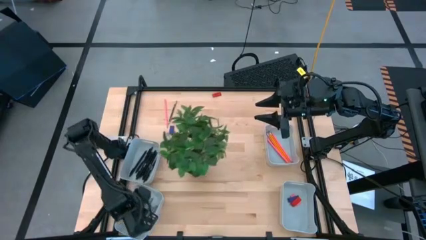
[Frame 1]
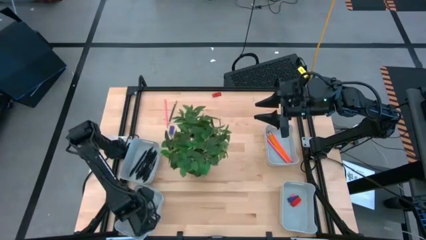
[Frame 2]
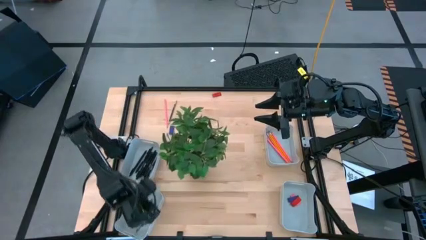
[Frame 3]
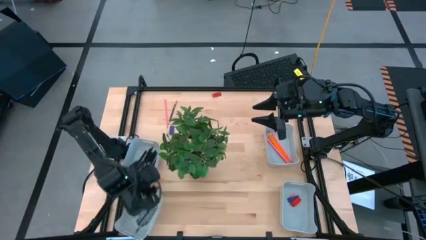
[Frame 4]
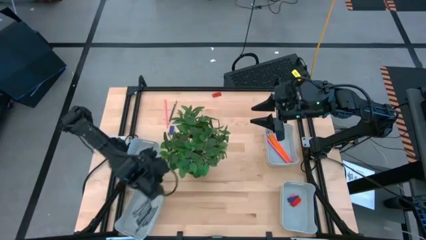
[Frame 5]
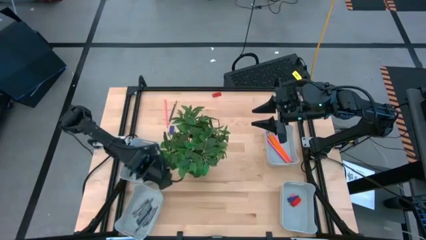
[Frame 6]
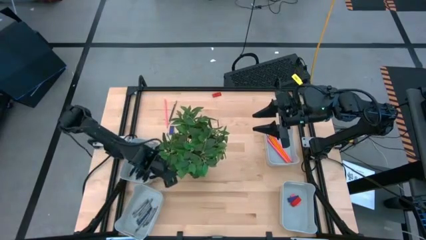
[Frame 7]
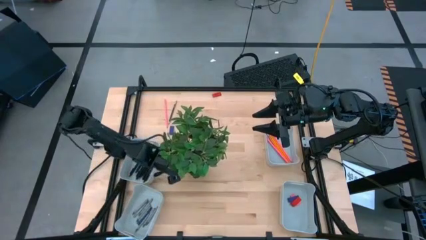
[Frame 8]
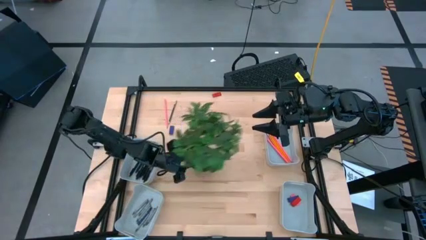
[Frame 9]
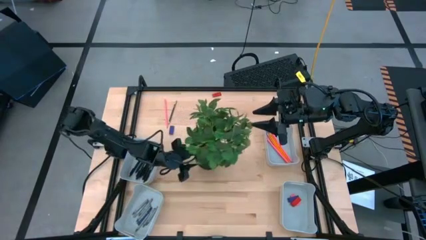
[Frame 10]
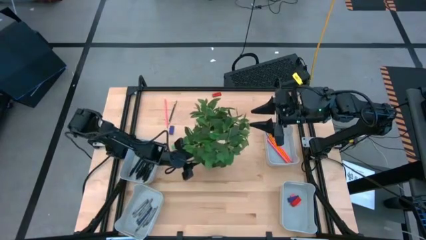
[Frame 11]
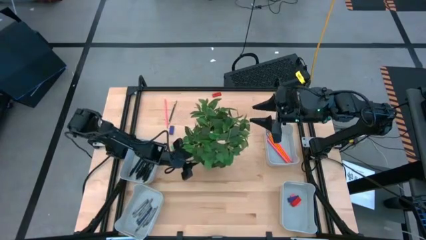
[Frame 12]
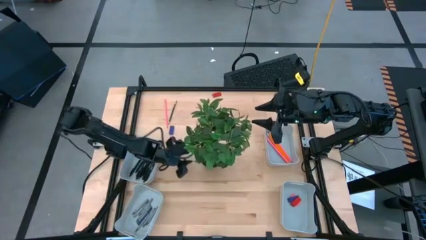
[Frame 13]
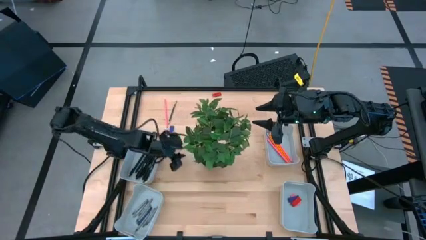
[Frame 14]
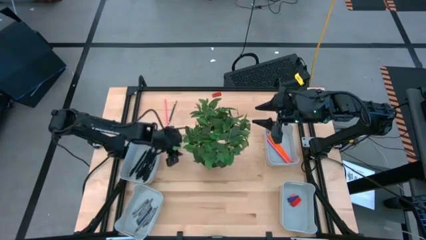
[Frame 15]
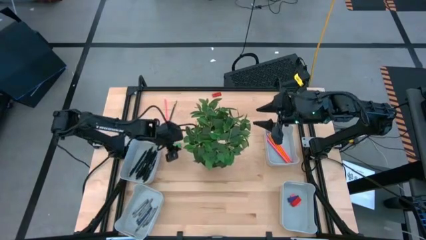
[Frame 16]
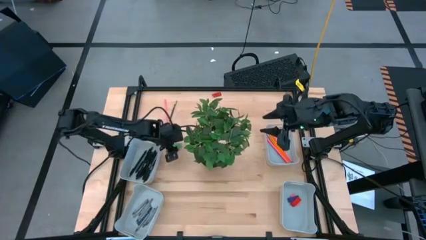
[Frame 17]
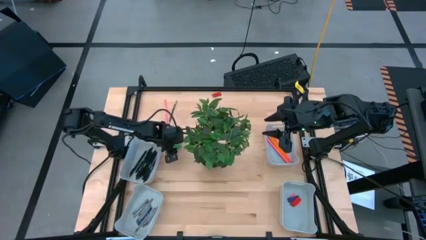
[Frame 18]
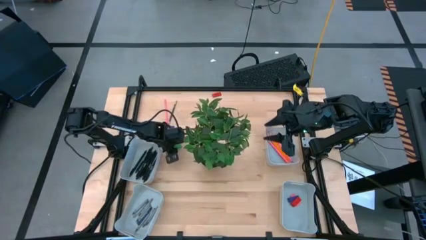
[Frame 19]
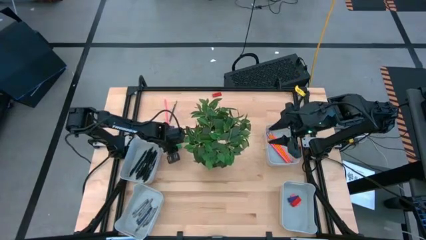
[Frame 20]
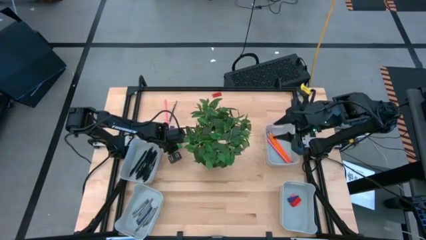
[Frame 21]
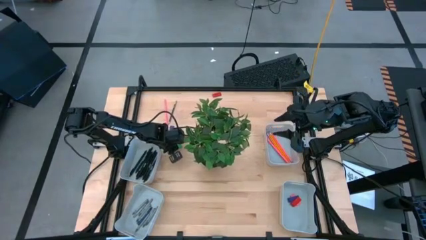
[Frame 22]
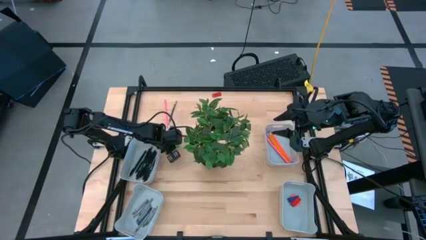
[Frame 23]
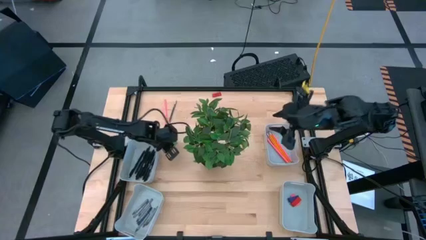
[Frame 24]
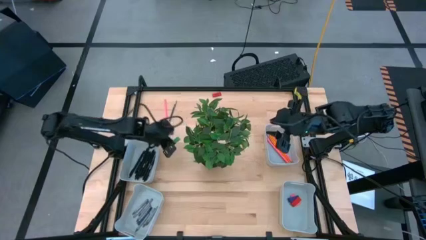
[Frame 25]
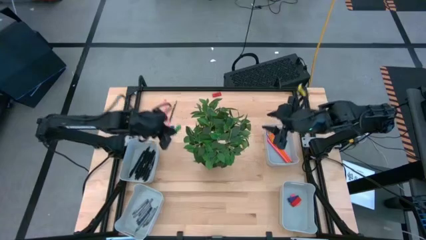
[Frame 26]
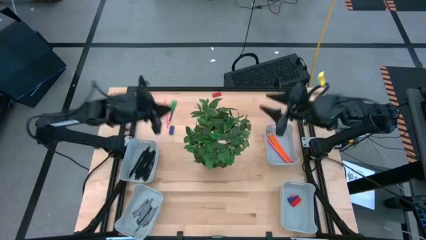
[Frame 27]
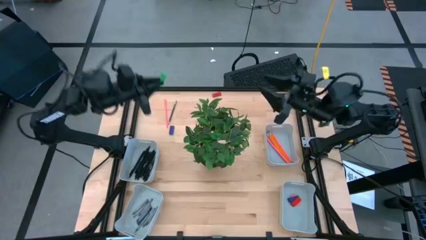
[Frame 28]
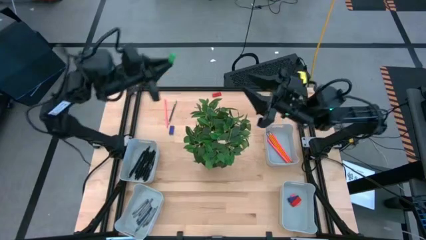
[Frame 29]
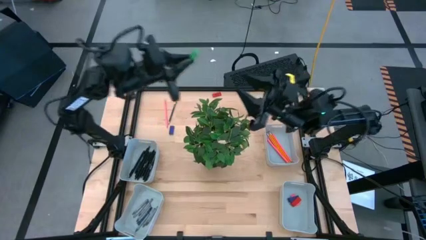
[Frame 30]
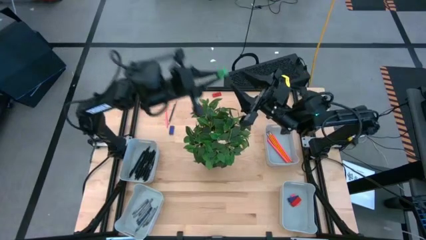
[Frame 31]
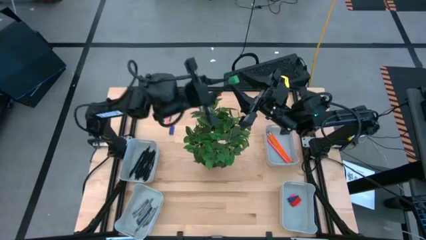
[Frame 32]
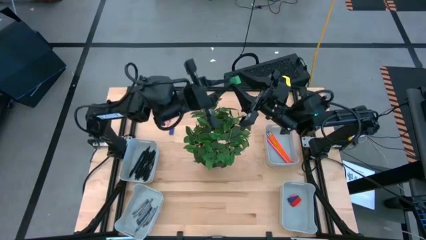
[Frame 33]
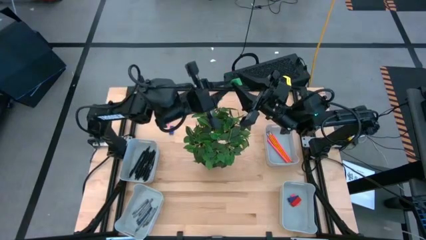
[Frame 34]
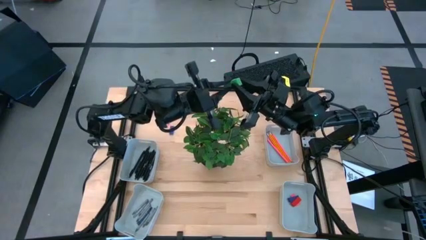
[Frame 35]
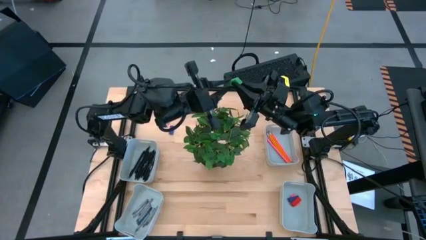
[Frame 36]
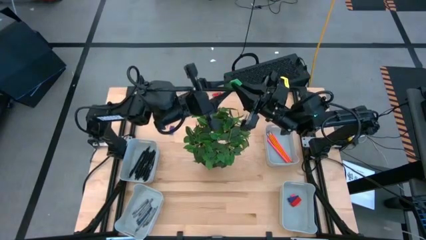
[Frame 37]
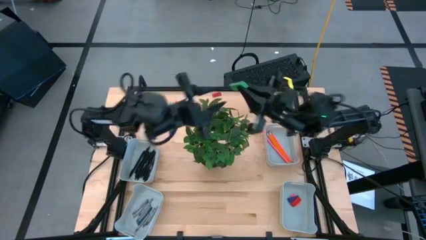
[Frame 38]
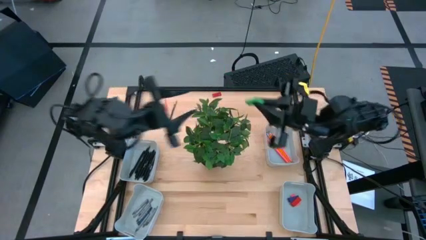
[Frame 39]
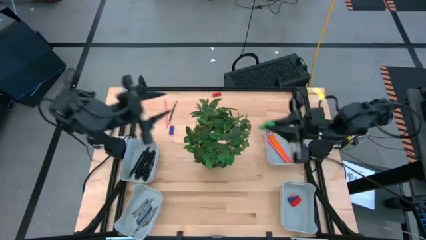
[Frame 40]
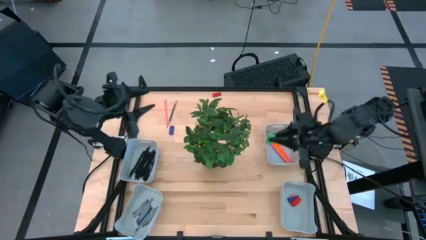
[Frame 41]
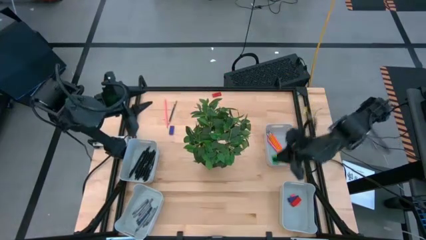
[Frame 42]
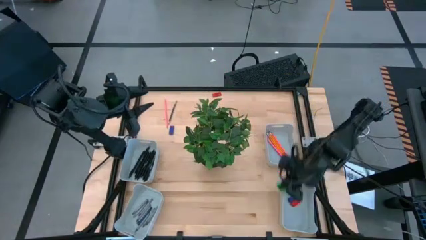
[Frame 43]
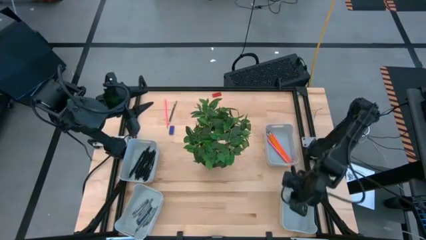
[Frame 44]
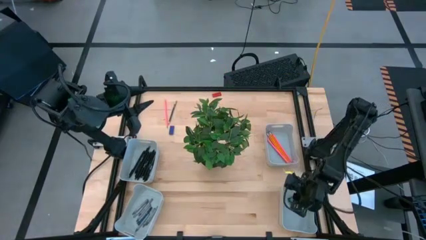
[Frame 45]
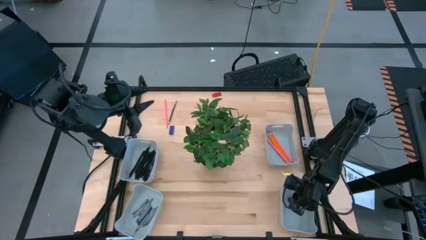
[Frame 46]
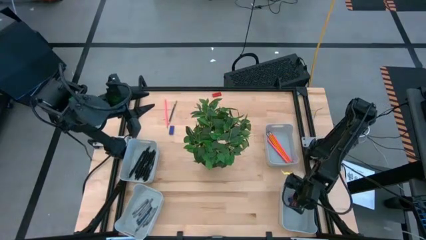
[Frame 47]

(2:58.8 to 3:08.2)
Task: Sort crayons/erasers/pens/pencils in bins
Put the green eraser into the bottom right gray bin

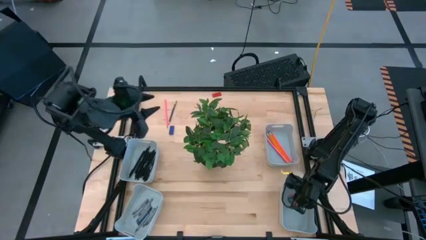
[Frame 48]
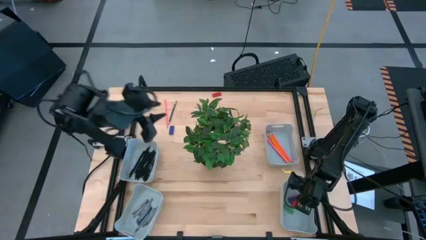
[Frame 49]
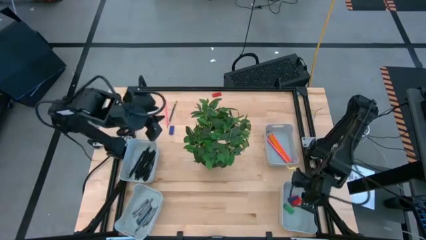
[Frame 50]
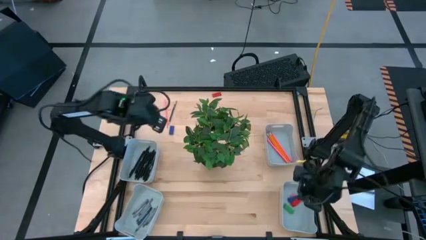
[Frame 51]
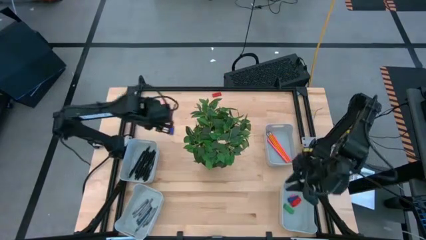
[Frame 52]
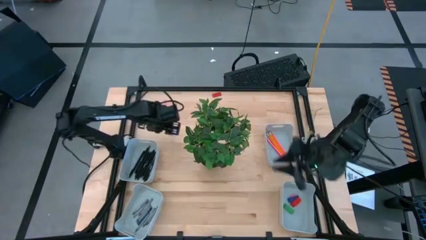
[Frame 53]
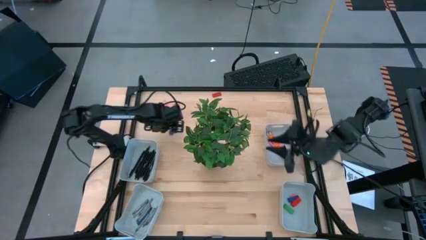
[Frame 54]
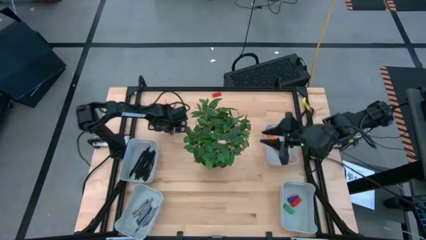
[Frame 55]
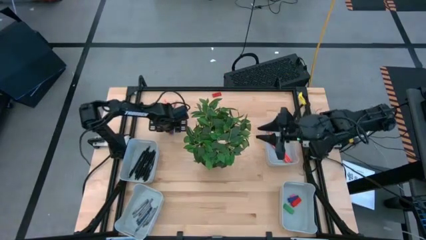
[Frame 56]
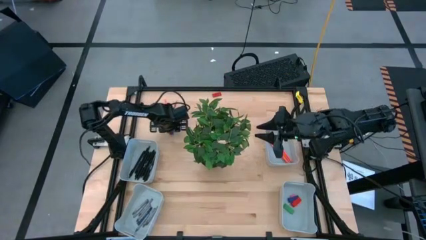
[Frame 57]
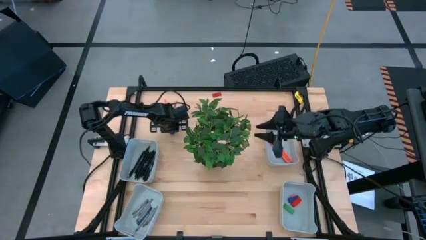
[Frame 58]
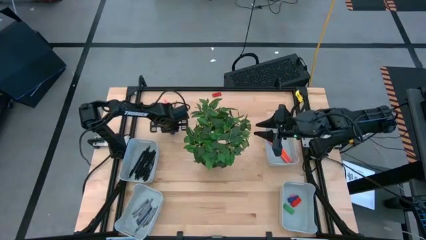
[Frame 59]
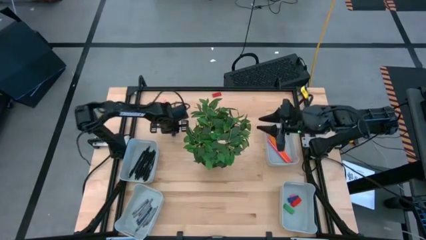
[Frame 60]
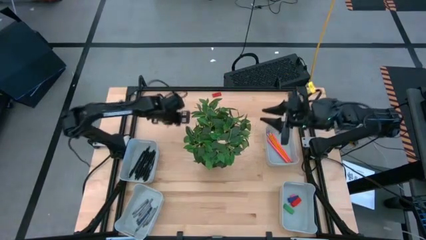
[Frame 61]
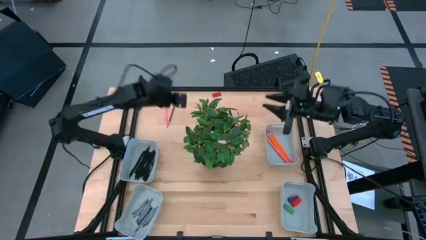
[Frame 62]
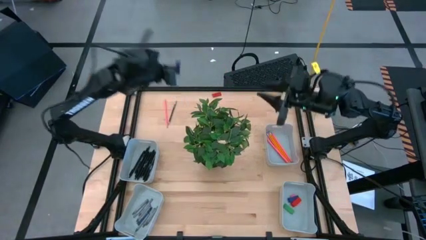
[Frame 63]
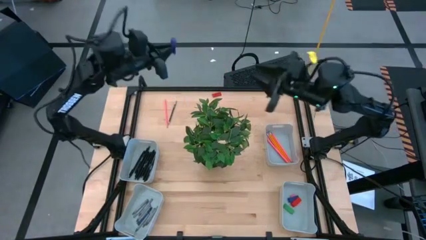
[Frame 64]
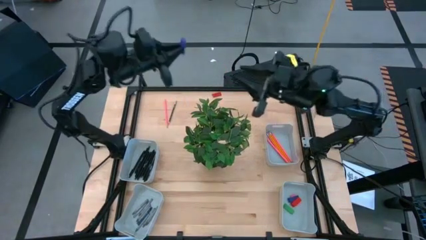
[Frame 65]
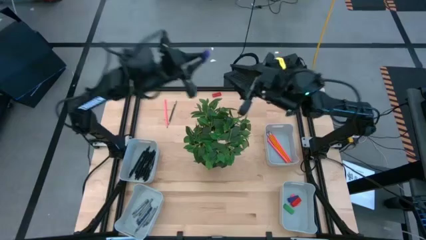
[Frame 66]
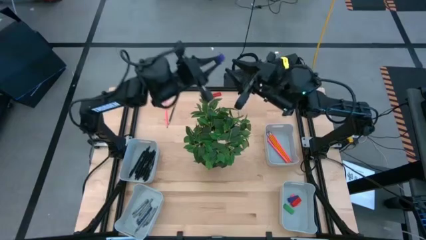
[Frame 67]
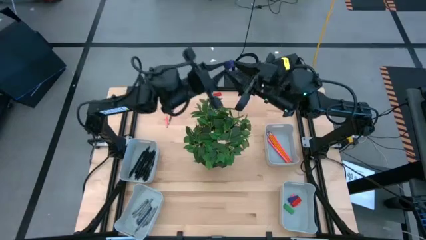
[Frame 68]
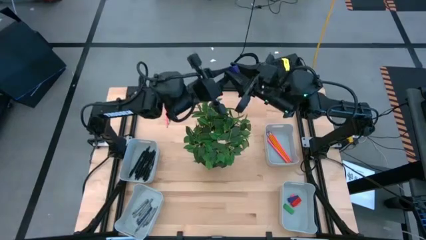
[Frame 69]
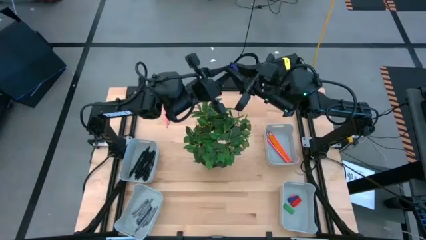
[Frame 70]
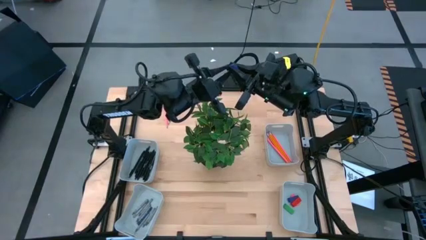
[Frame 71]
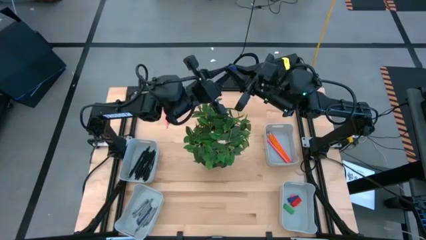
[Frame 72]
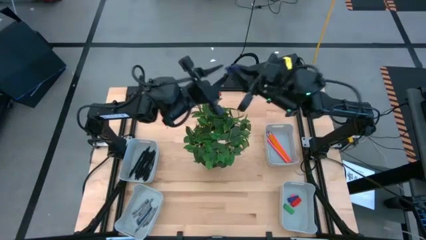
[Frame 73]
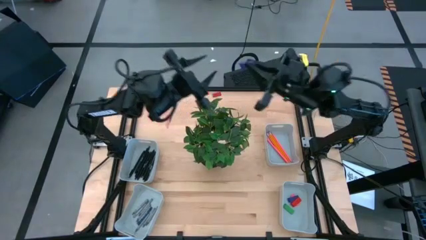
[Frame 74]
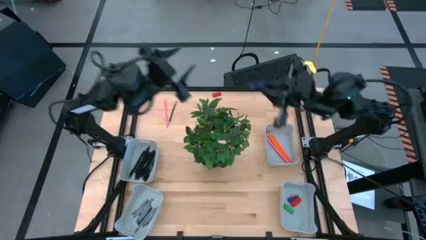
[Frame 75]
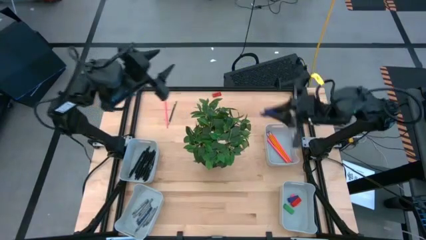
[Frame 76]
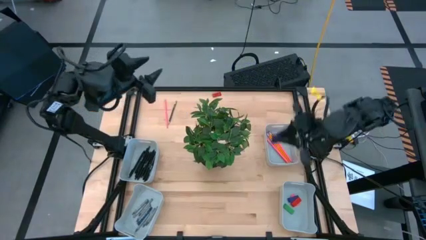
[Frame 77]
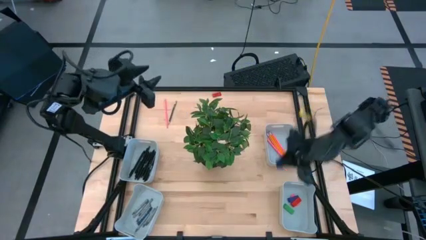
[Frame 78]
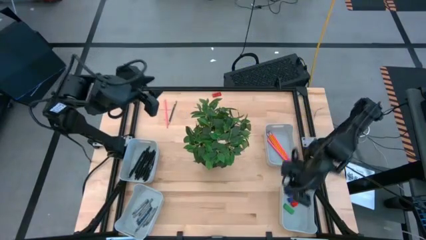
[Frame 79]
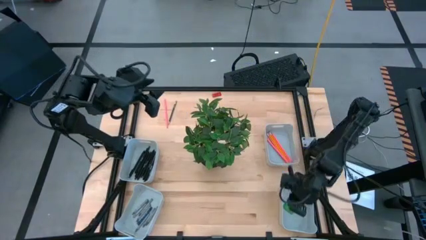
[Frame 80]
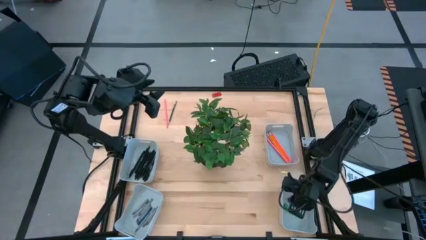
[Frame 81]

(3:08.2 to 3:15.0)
Put the purple eraser into the bottom right gray bin
